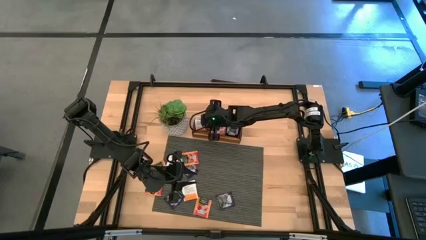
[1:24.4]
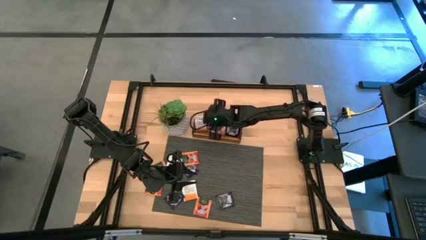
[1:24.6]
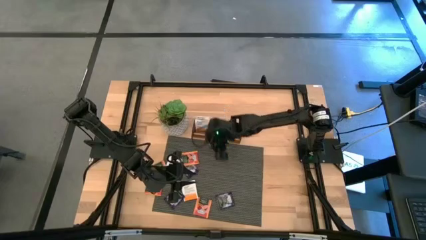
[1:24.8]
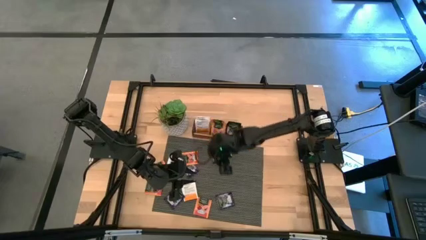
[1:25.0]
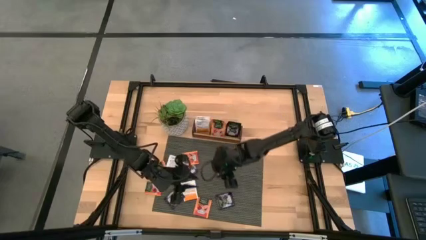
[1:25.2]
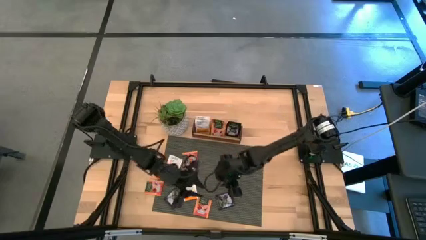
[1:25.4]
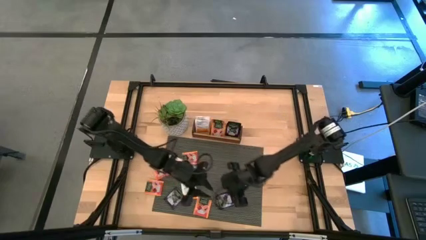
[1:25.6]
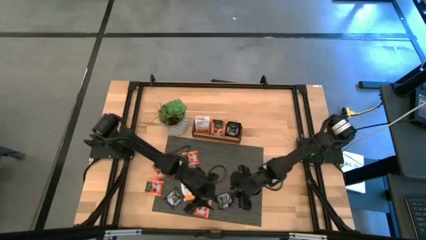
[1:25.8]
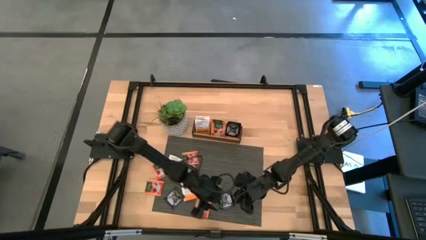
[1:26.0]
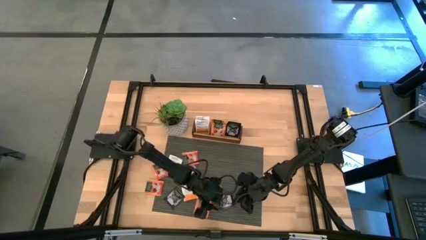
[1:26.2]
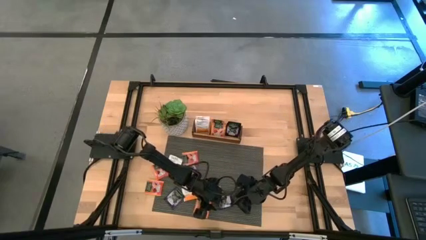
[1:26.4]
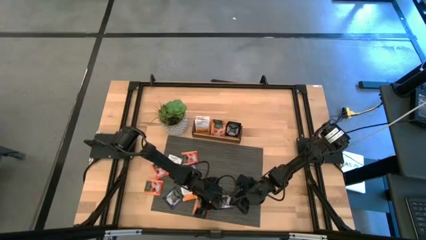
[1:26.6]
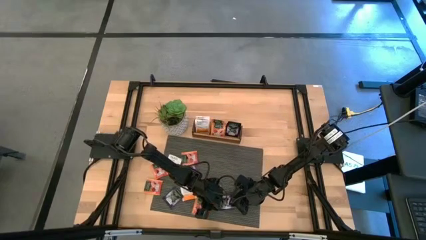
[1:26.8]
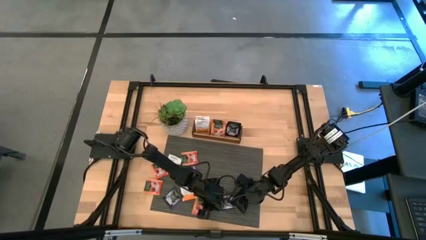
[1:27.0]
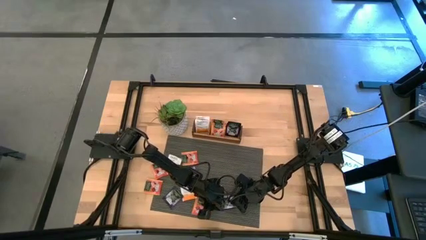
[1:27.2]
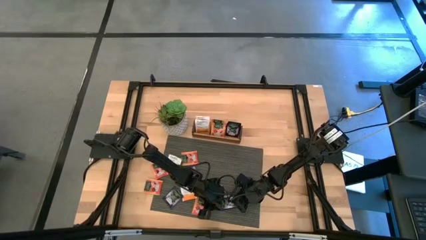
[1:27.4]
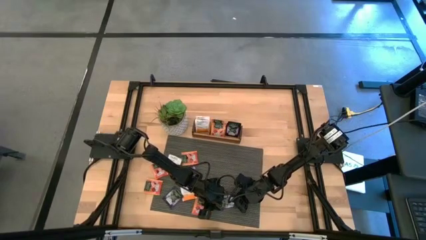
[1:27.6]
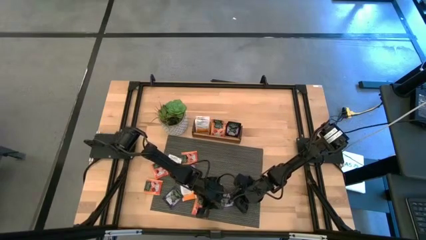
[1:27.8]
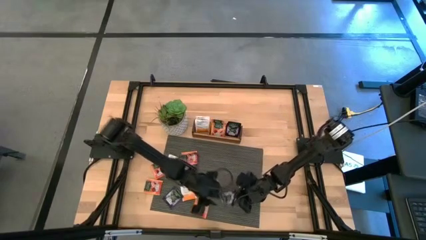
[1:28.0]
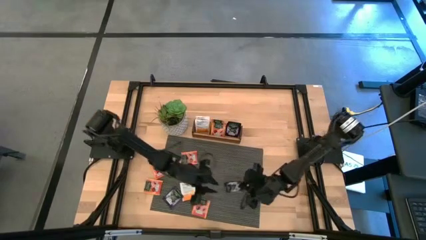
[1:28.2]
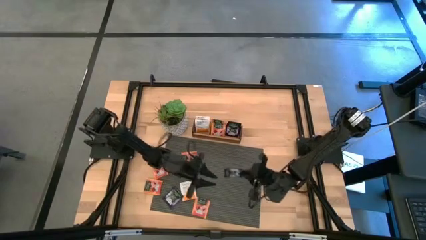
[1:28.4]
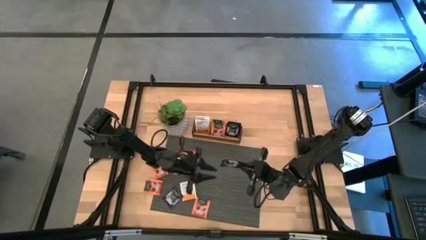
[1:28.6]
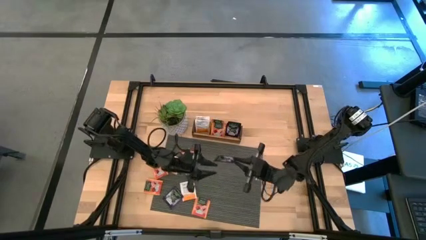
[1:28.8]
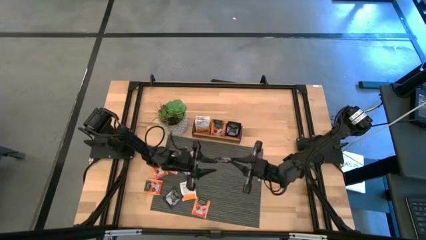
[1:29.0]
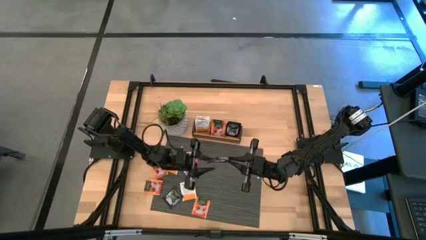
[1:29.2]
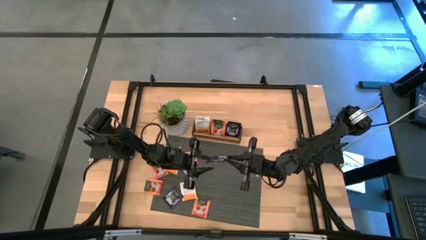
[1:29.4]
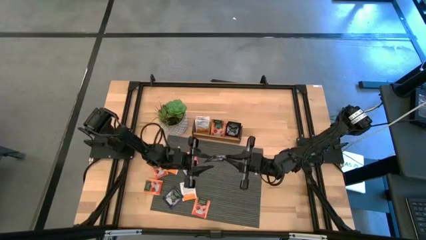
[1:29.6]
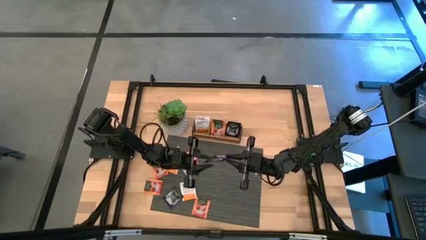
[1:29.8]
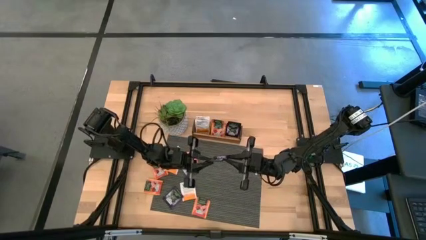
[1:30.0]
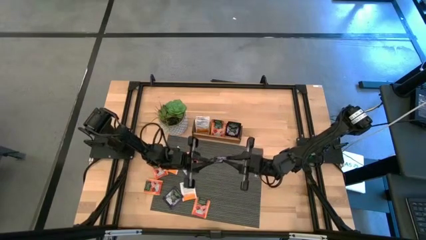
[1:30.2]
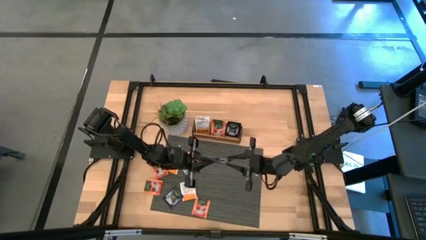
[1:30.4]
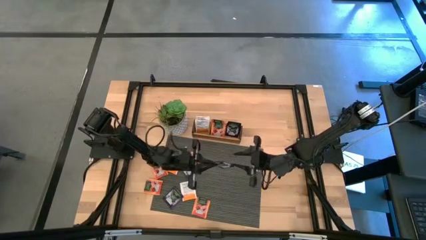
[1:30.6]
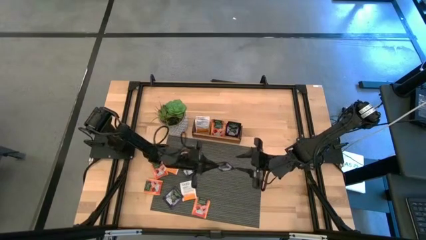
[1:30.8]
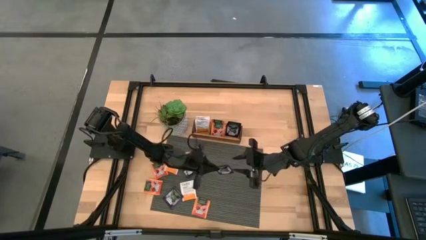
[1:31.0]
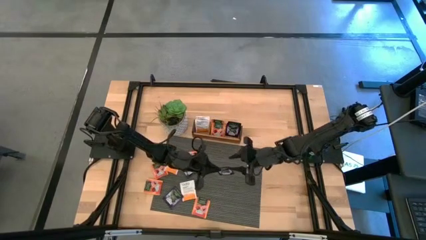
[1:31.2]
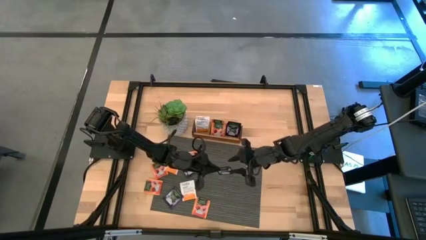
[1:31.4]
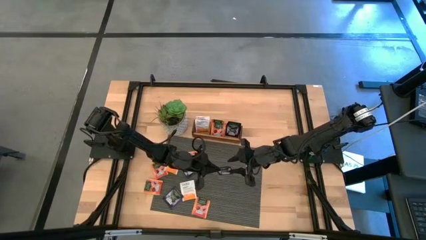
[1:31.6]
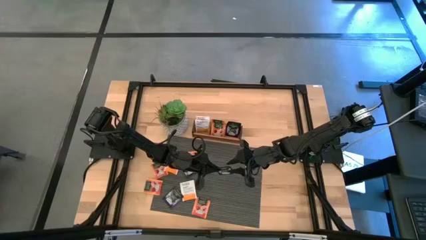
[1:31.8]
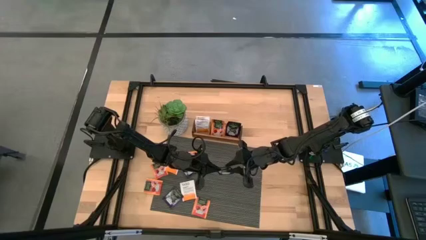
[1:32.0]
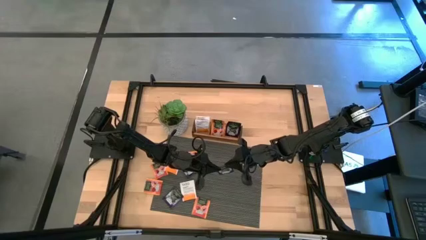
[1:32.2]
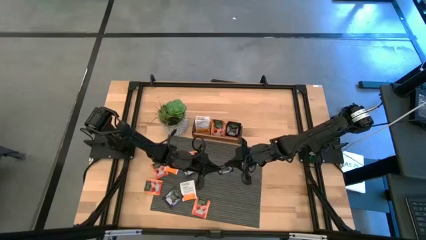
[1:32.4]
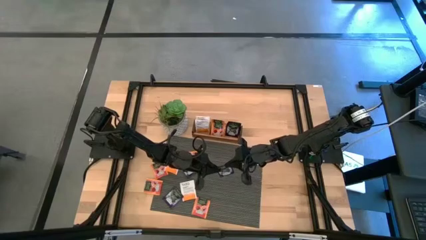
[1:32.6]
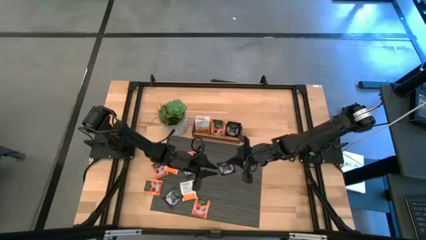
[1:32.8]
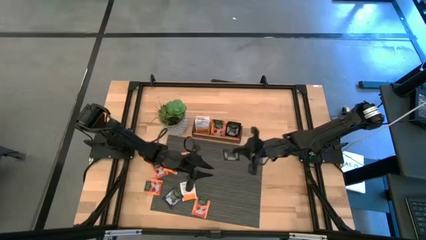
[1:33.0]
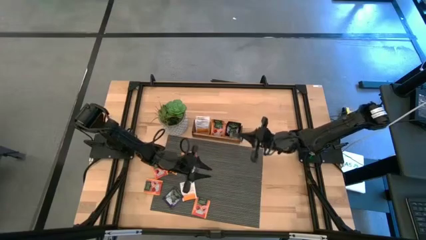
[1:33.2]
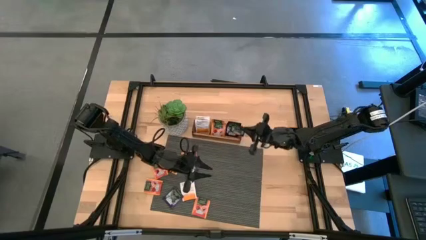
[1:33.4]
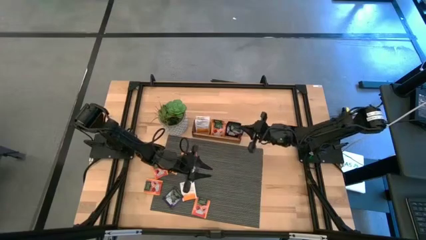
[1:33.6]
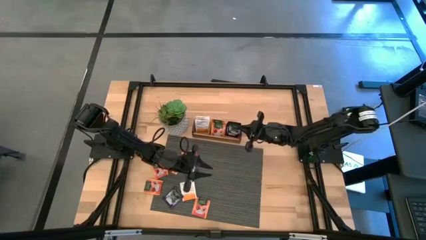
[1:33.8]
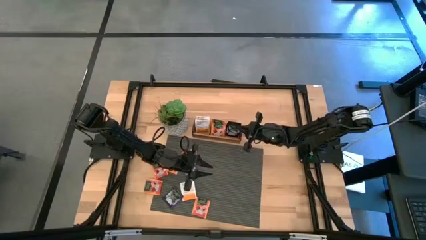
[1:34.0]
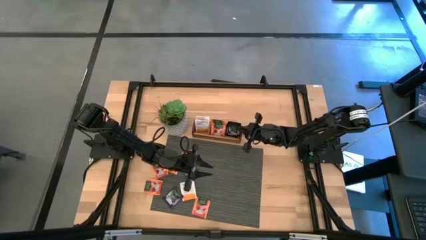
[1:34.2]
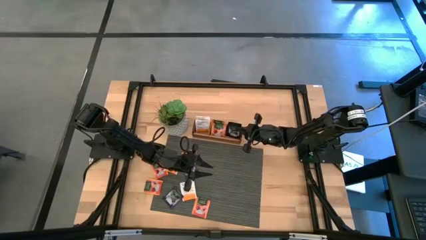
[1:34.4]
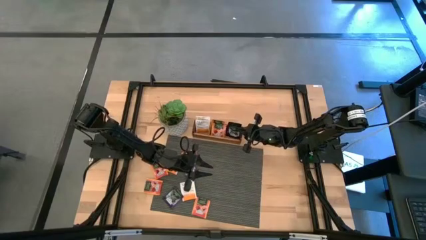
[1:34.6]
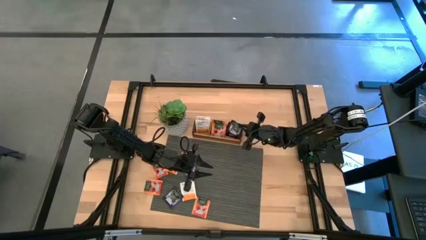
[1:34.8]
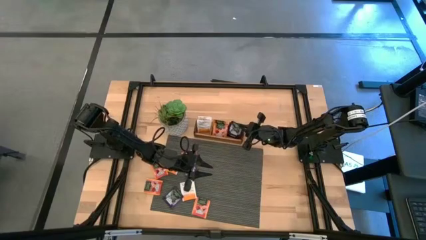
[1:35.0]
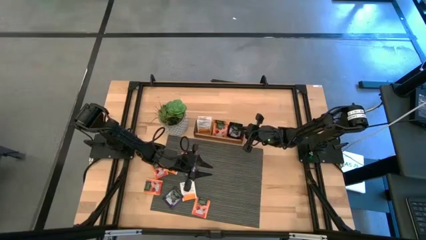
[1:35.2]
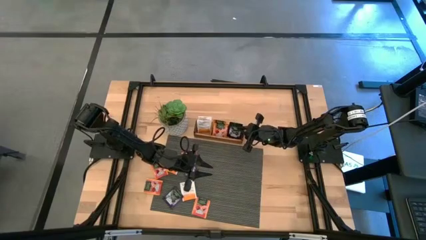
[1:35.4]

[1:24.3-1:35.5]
Task: Pick & Place Tea
Put the blue tea bag into the right section of the wooden organizer

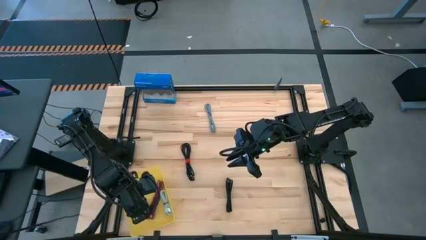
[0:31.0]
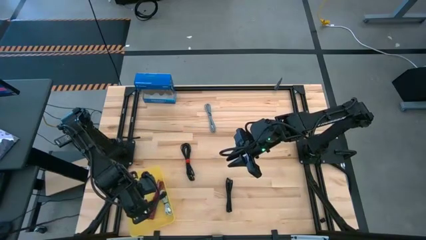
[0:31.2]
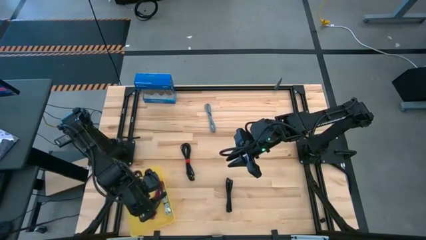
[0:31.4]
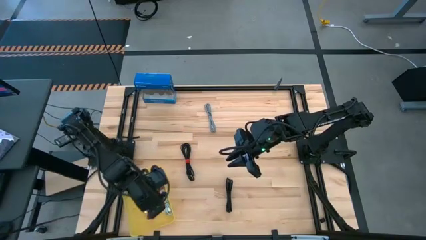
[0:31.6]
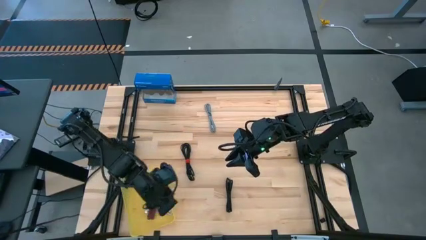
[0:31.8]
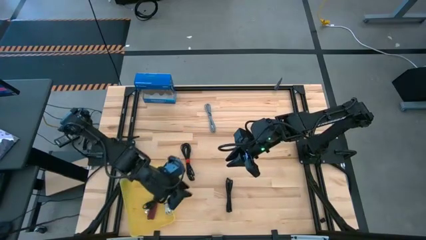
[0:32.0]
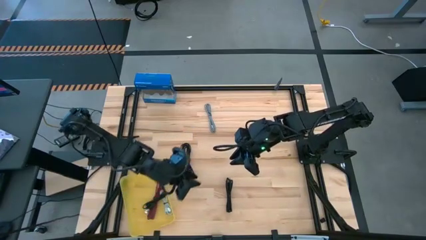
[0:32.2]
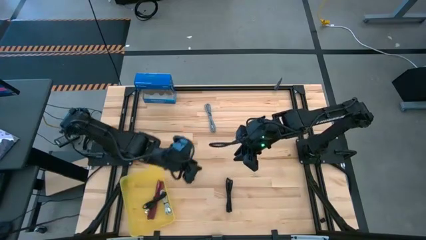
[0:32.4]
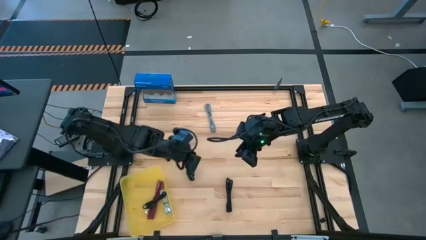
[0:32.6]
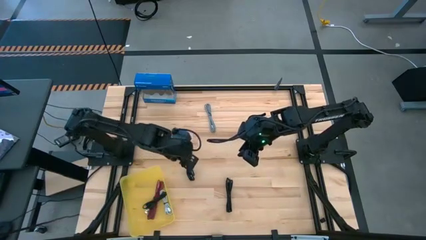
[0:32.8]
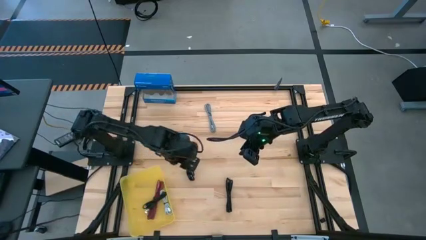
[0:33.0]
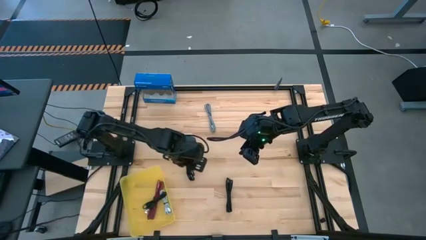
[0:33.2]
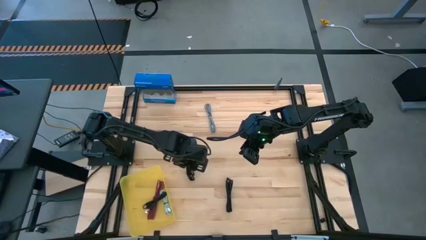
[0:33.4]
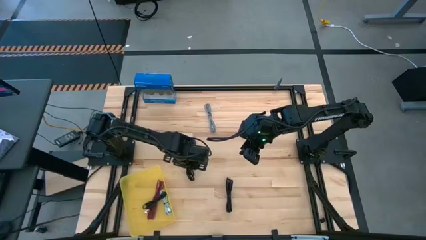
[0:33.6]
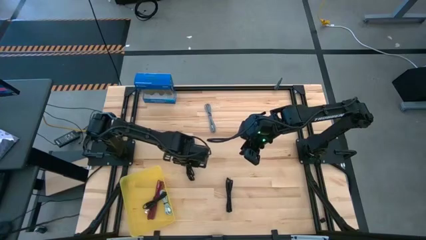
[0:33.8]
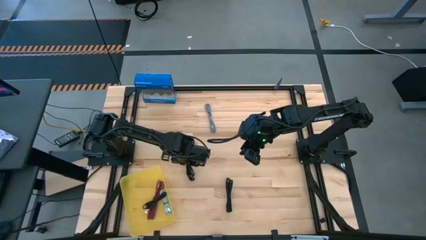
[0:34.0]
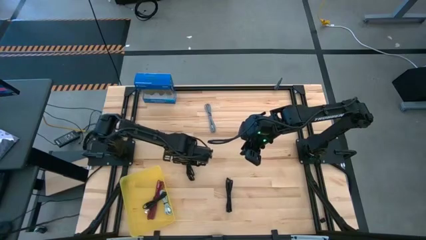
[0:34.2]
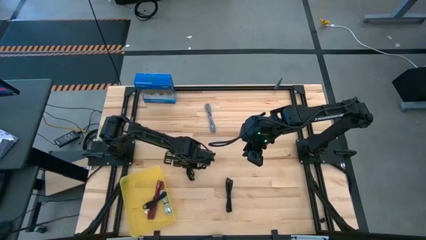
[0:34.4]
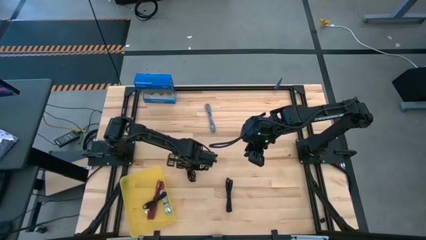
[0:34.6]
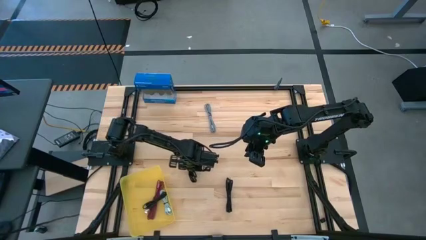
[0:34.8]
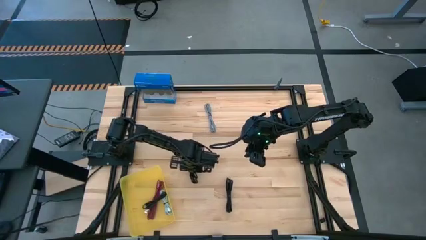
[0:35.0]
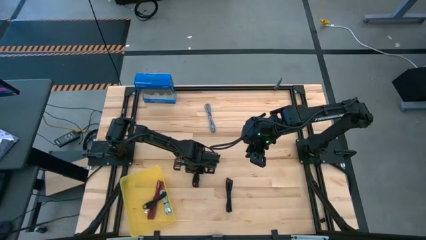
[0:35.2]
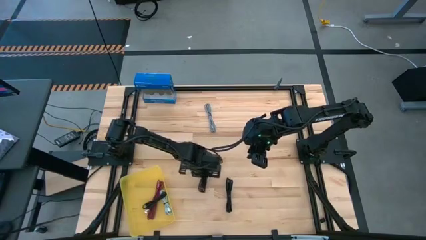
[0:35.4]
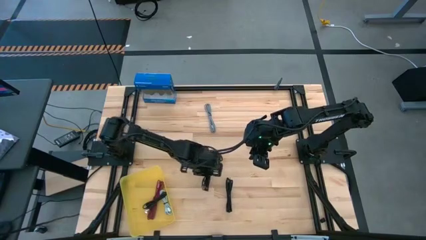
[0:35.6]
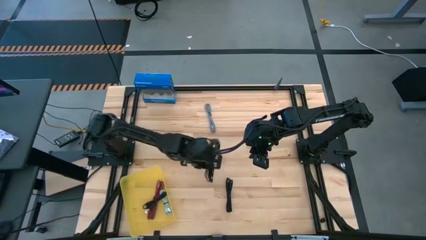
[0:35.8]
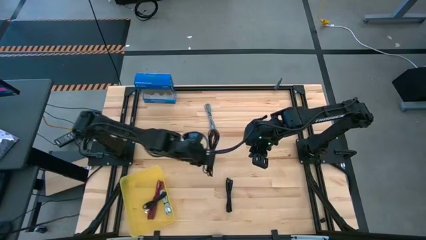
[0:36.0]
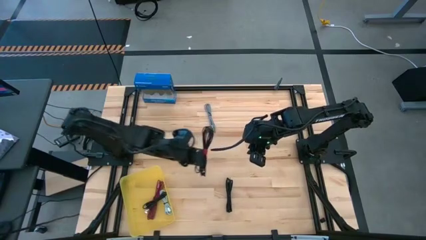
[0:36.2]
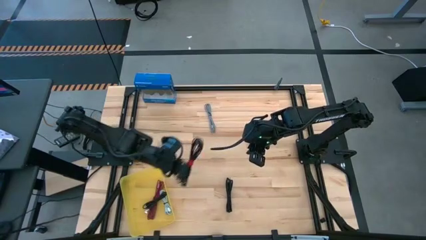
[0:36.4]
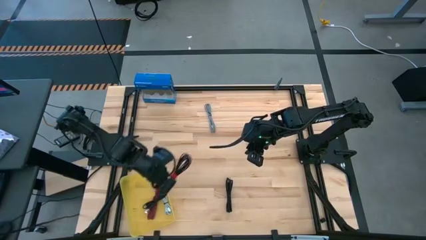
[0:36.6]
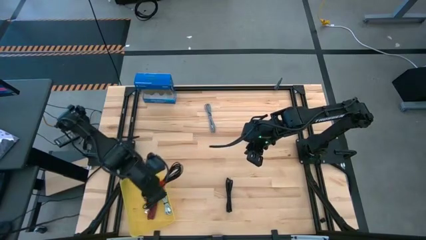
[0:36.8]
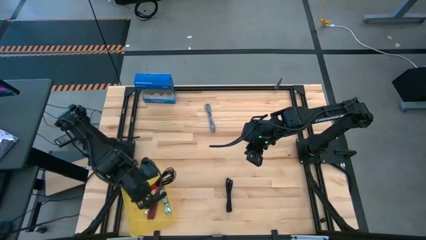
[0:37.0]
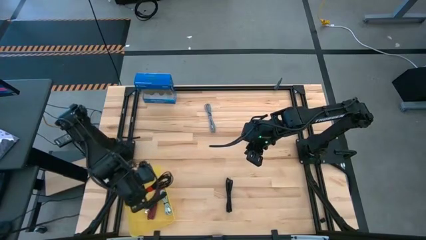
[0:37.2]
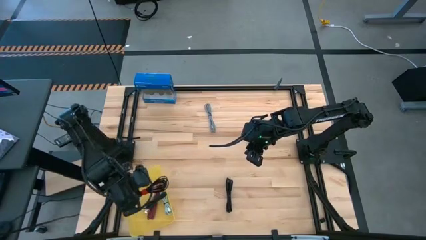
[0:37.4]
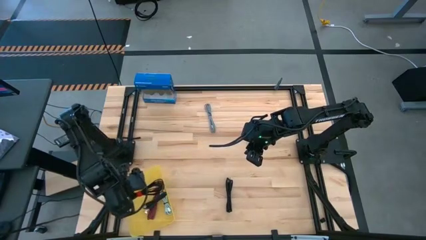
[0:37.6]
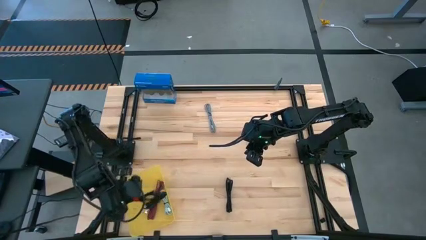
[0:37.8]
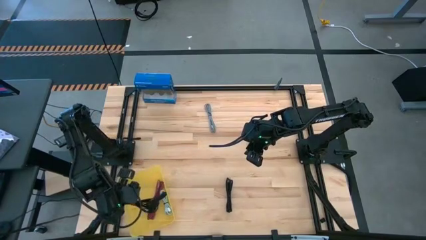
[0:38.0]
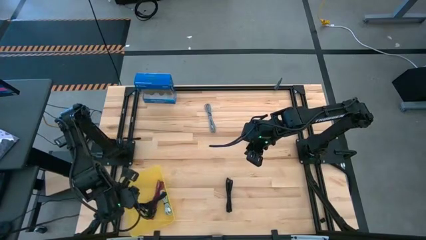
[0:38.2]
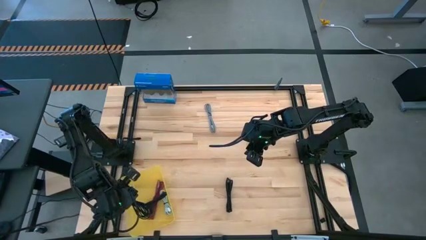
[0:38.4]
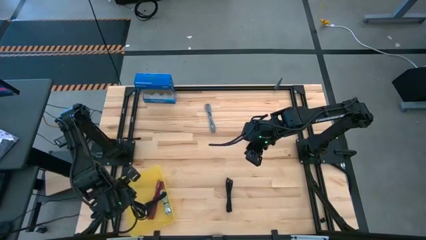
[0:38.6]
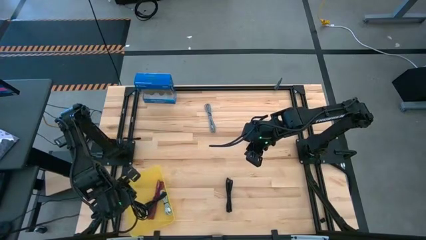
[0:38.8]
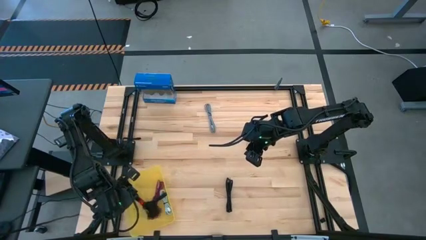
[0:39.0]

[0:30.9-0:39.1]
Task: Pick and place USB-C Cables
Put the left black charger cable into the yellow bin
